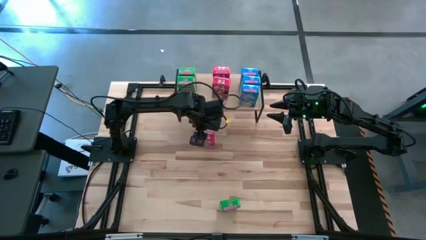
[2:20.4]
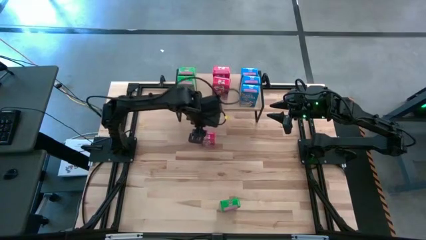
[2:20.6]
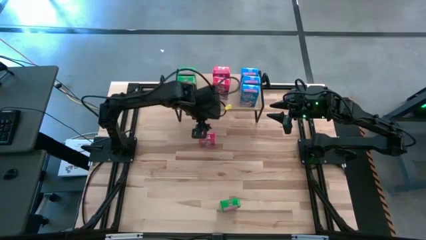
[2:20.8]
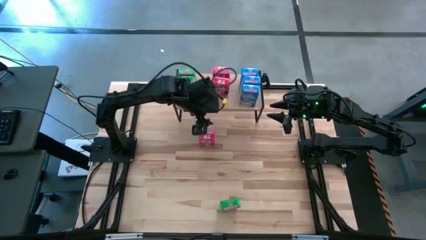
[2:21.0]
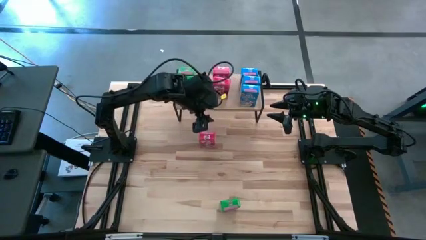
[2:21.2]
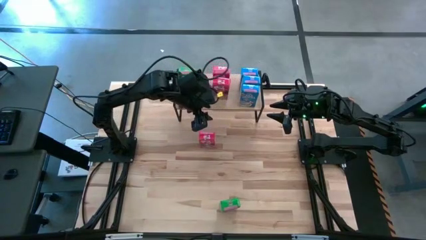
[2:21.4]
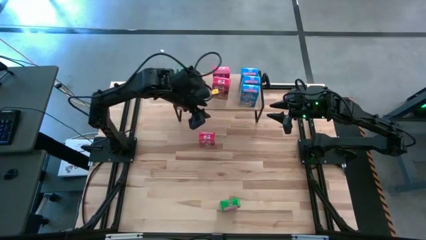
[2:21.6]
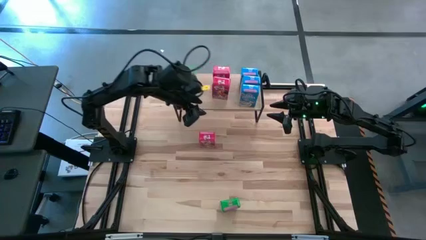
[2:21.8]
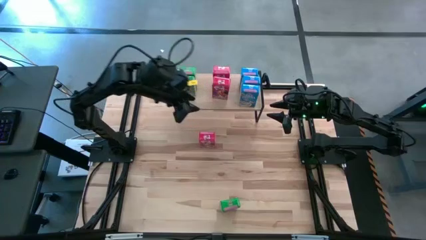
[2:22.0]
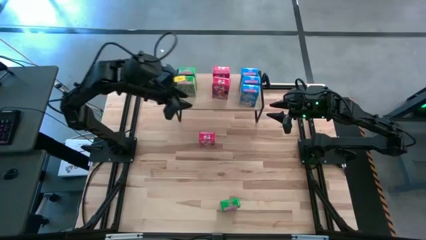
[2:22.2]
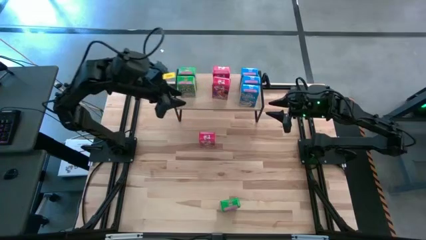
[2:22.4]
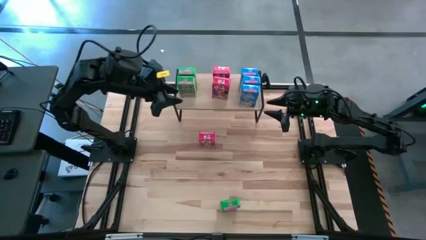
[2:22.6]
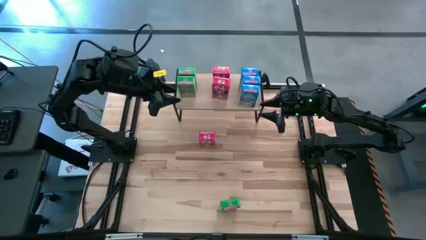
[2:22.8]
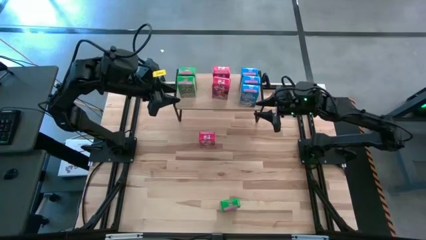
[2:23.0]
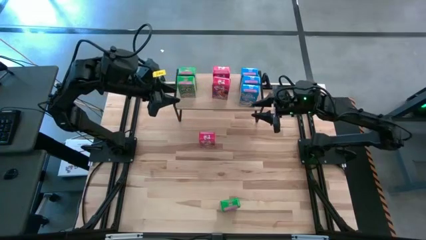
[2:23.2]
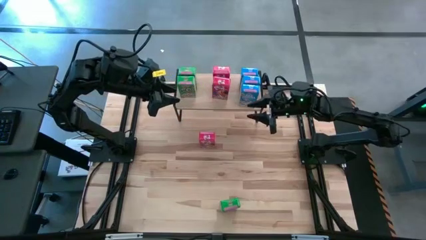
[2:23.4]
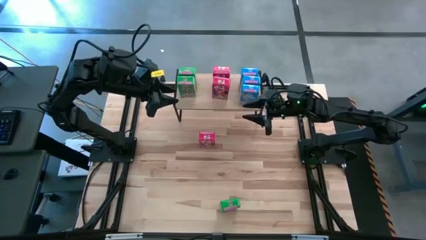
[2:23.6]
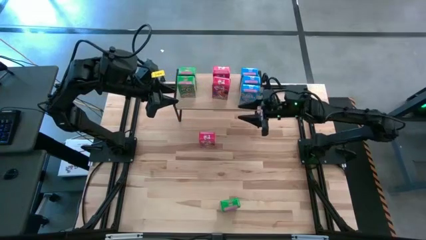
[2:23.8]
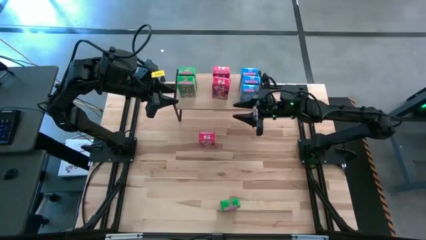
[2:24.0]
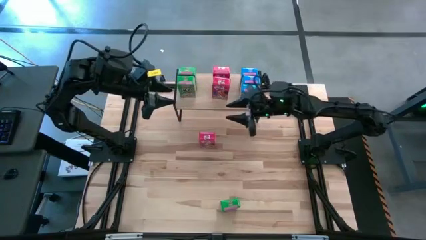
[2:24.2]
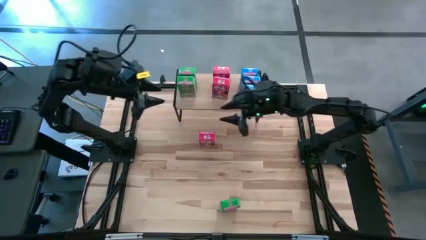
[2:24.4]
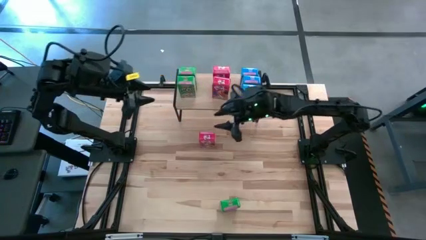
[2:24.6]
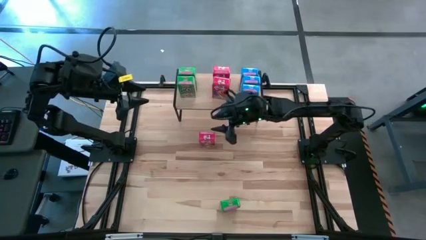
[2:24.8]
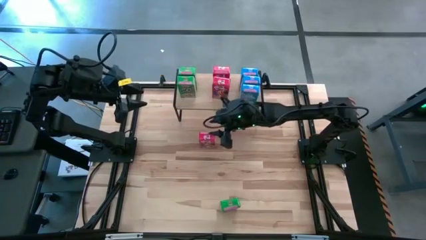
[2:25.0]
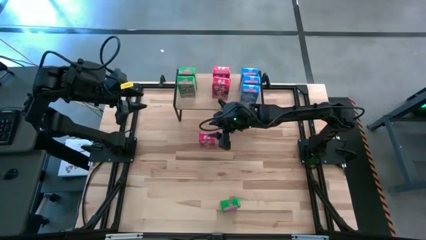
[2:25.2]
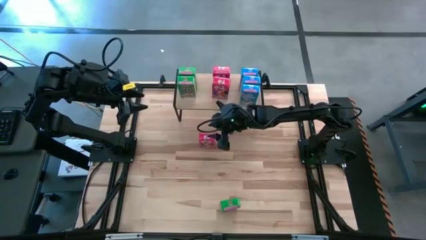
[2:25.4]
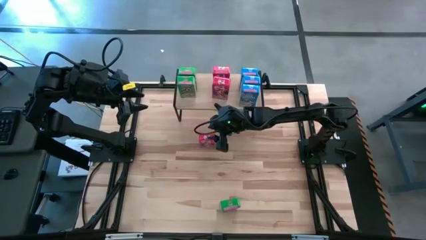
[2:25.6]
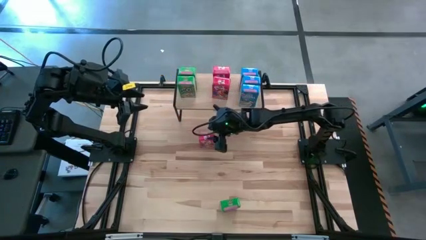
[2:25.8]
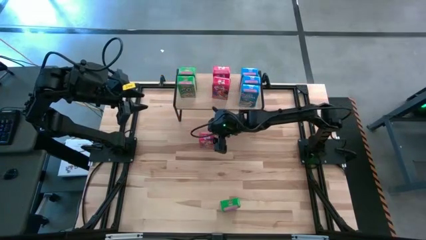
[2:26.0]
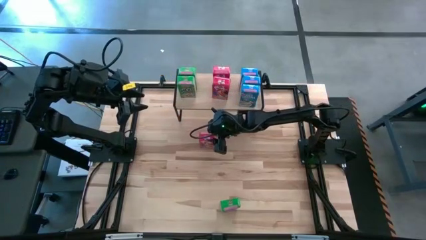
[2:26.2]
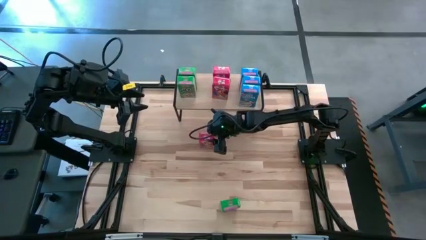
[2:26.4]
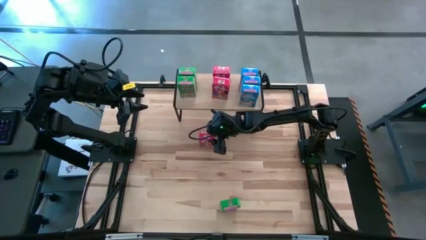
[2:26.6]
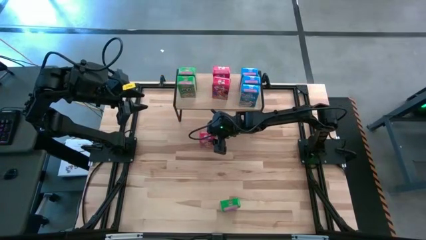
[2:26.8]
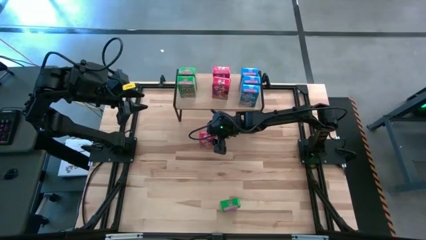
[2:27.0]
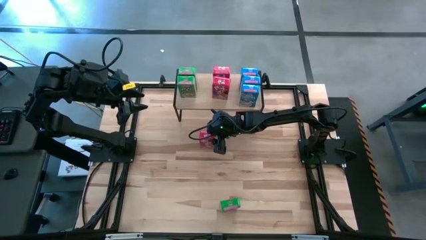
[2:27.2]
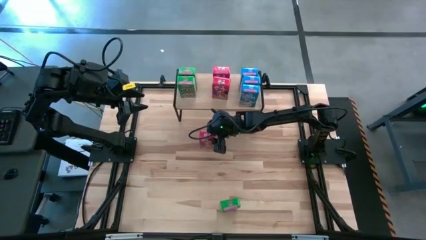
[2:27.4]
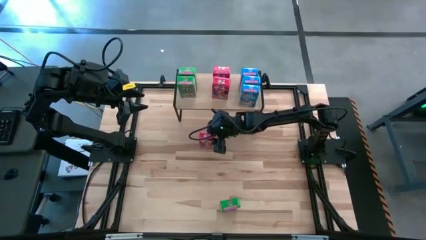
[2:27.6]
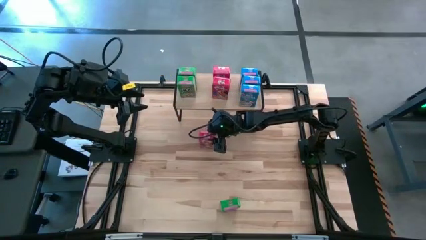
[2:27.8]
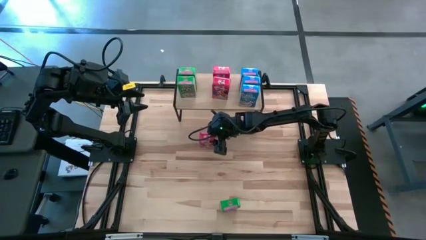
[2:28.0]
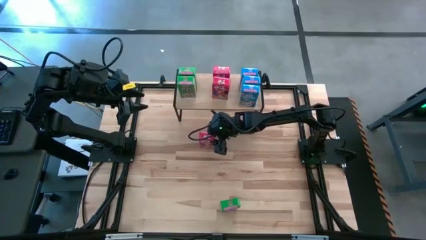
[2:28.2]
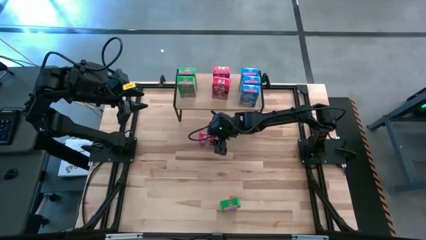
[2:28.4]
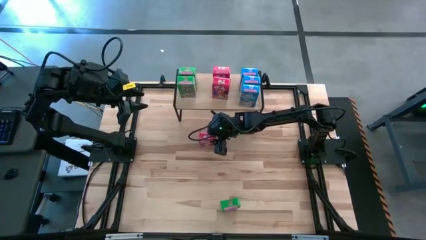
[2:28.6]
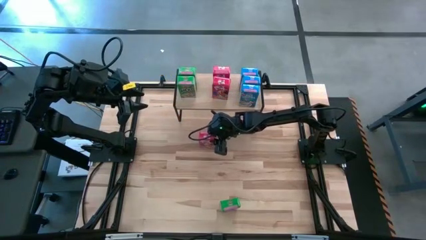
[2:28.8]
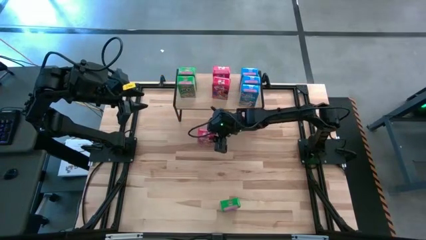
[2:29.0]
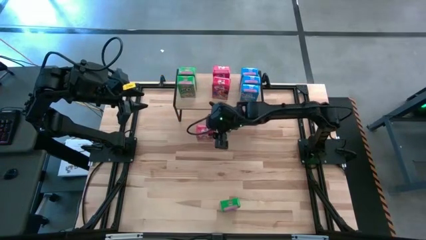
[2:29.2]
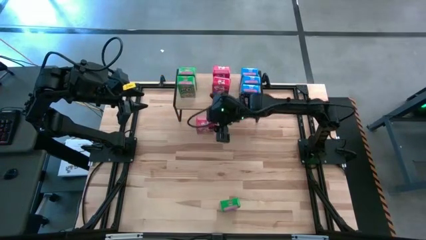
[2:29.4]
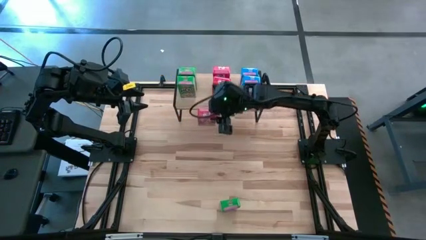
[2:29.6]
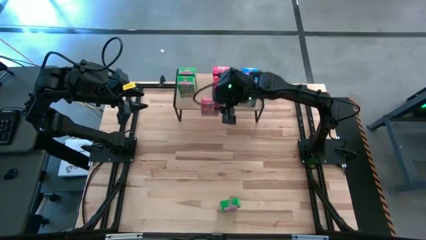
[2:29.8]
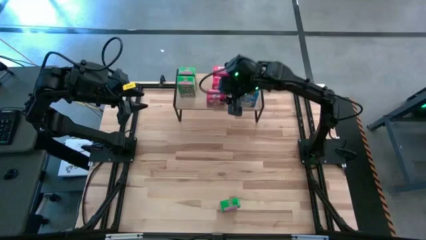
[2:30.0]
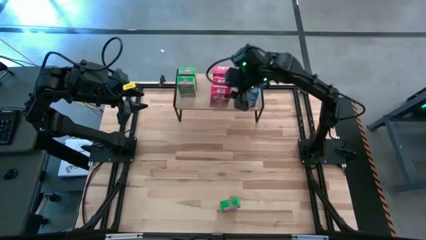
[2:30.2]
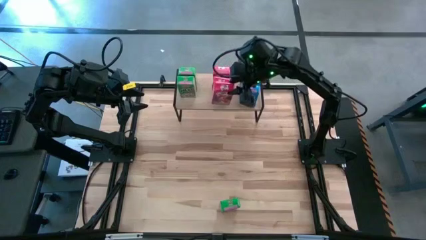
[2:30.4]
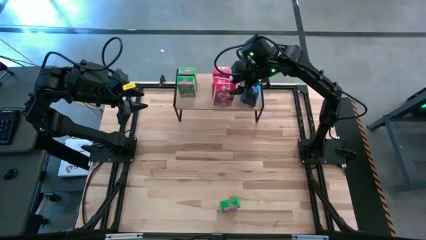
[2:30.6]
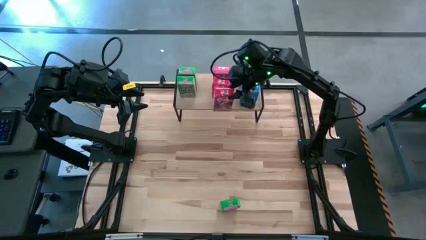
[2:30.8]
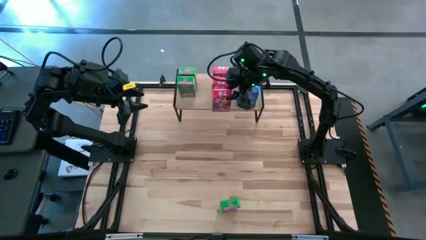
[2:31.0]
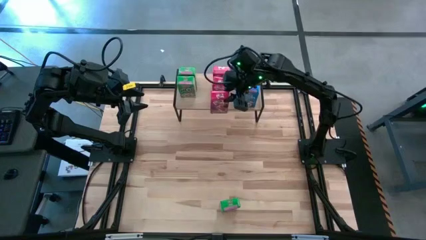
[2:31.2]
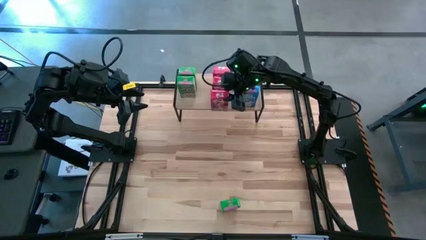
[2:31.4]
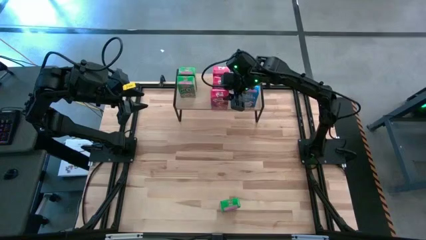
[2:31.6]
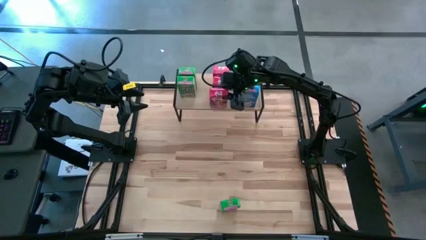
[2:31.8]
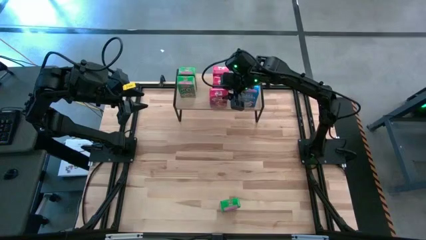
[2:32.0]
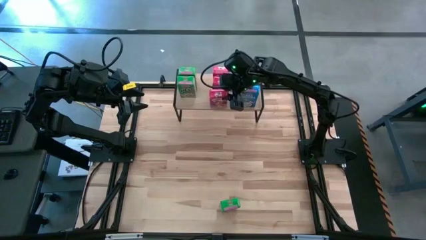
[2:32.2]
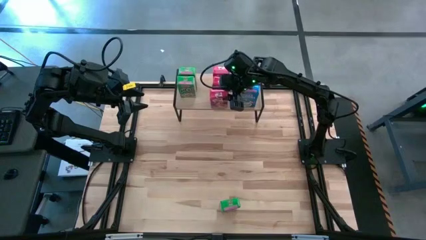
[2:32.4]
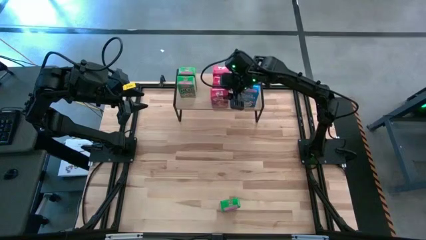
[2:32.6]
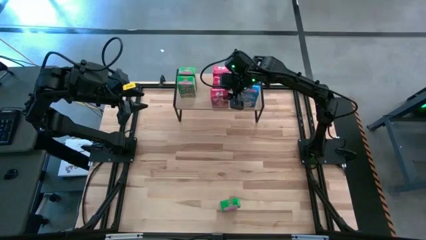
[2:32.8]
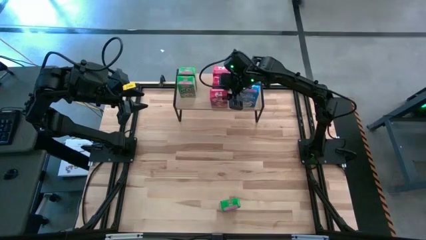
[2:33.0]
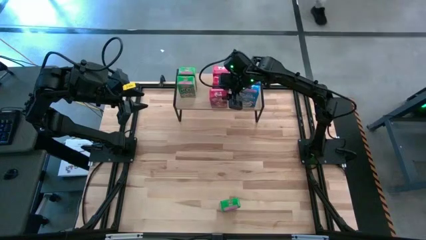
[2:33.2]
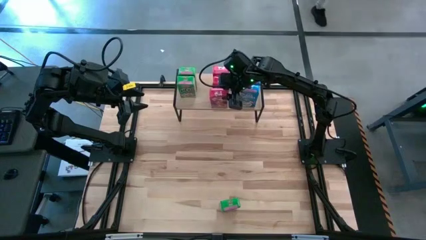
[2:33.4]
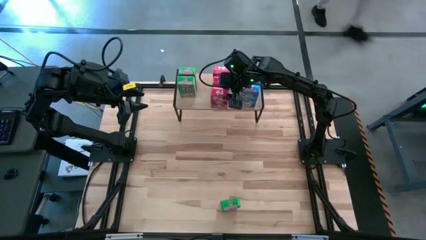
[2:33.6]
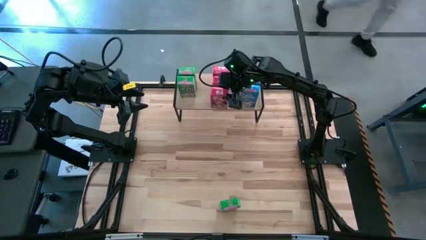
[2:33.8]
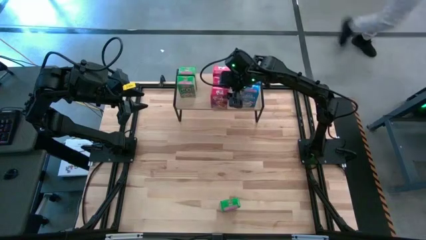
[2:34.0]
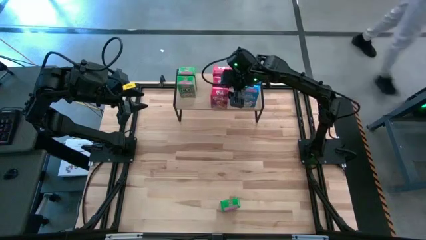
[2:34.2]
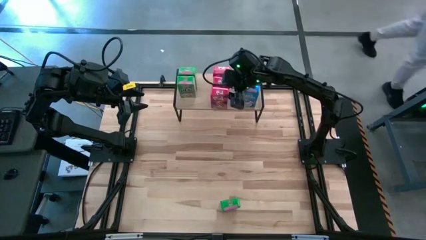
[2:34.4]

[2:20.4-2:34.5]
Task: Stack cereal on shelf
Put the red cereal box on the shelf aligned with the other red cereal boxes
